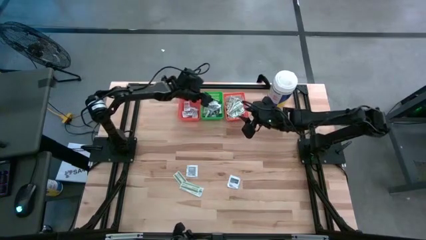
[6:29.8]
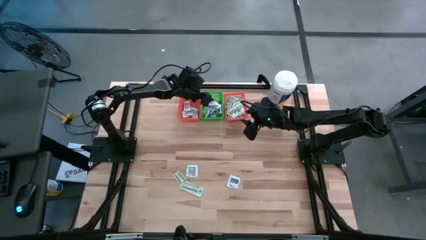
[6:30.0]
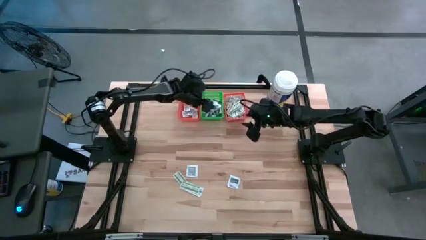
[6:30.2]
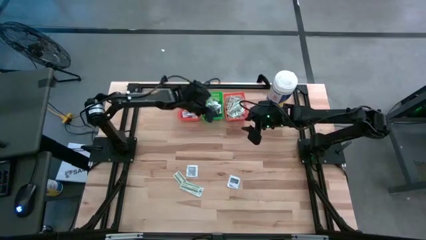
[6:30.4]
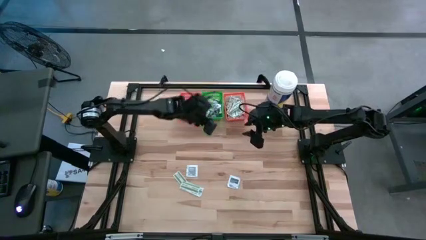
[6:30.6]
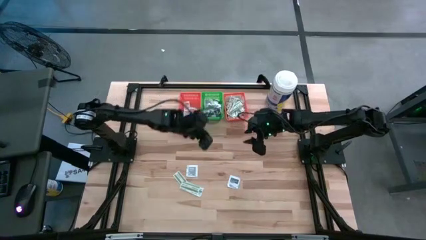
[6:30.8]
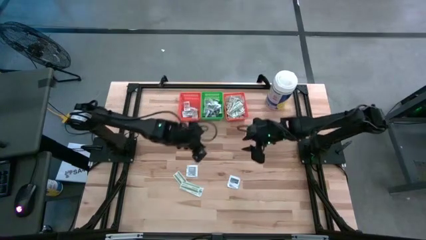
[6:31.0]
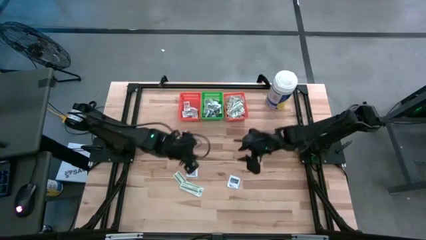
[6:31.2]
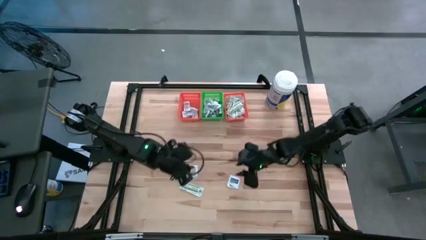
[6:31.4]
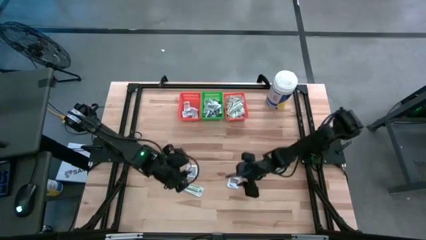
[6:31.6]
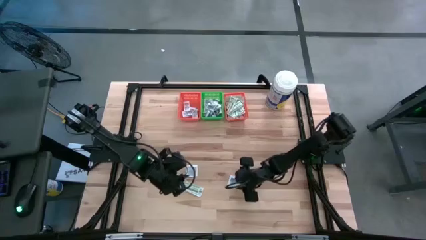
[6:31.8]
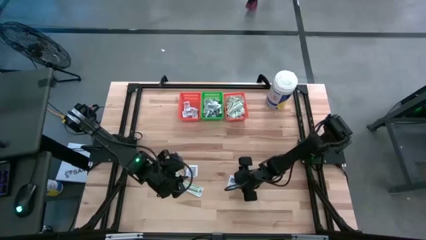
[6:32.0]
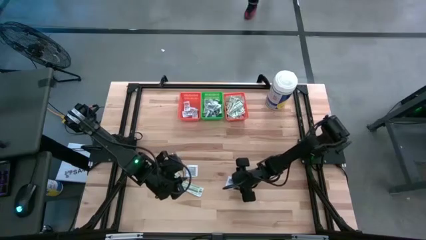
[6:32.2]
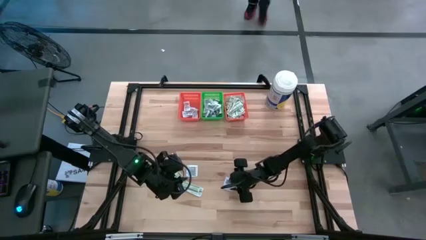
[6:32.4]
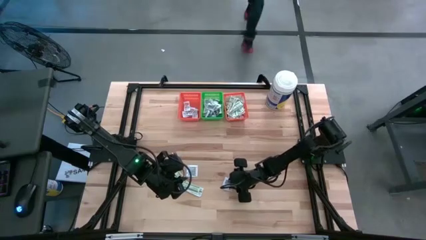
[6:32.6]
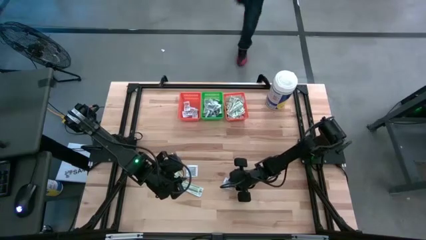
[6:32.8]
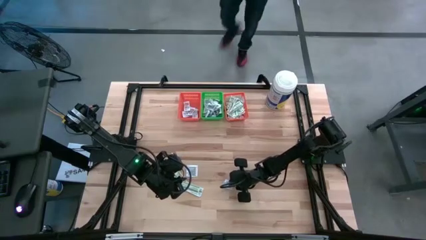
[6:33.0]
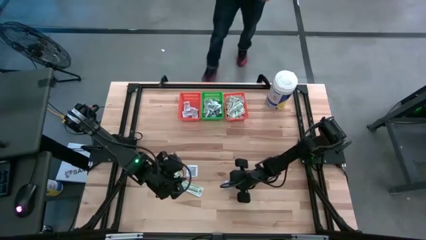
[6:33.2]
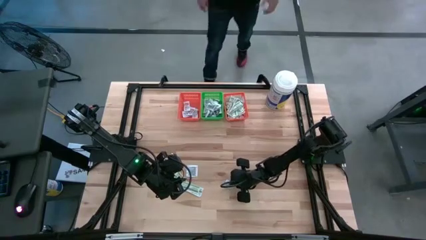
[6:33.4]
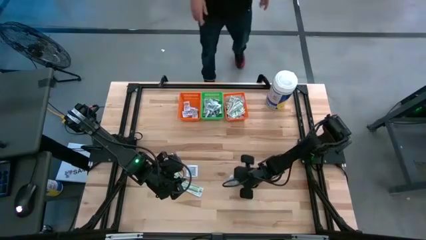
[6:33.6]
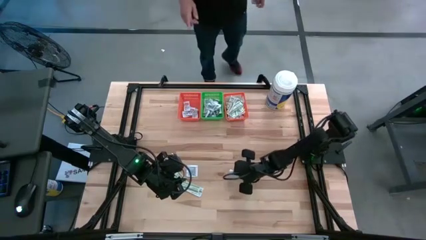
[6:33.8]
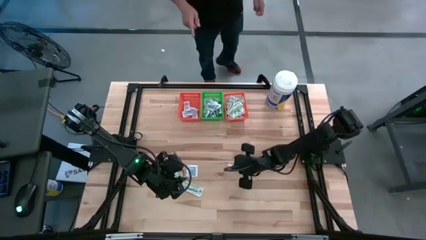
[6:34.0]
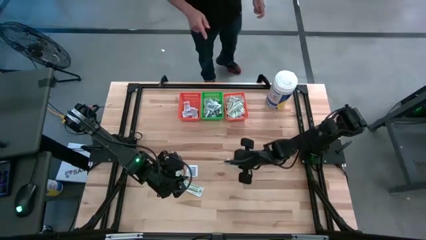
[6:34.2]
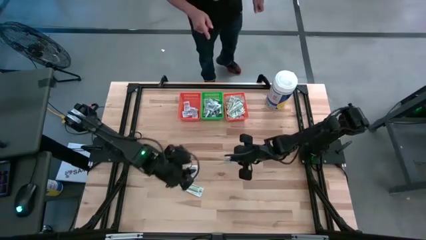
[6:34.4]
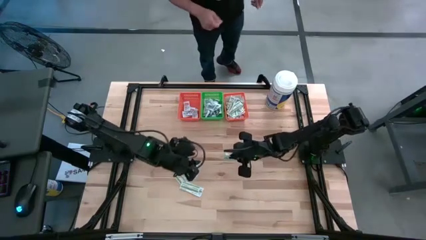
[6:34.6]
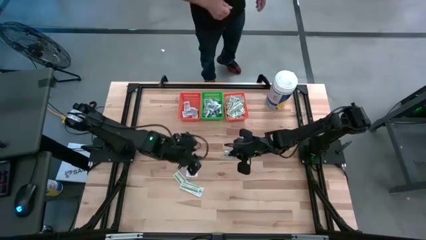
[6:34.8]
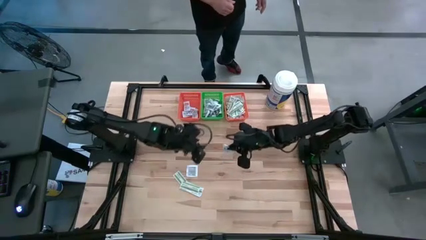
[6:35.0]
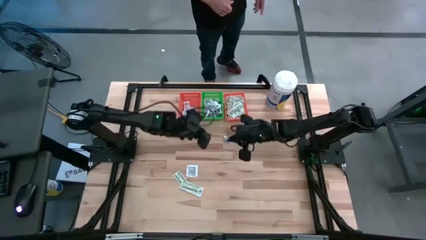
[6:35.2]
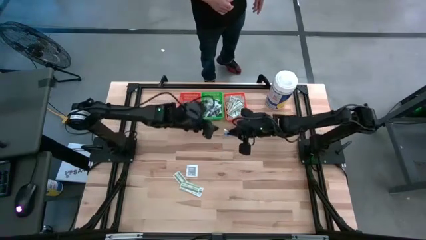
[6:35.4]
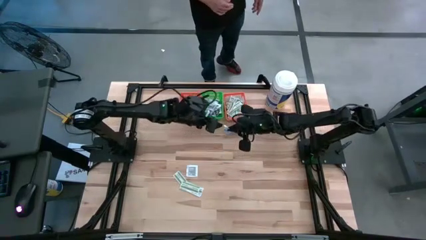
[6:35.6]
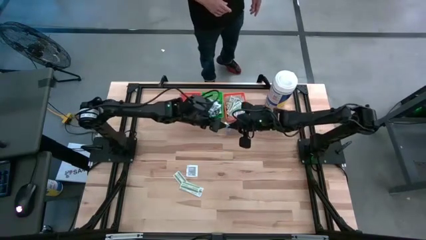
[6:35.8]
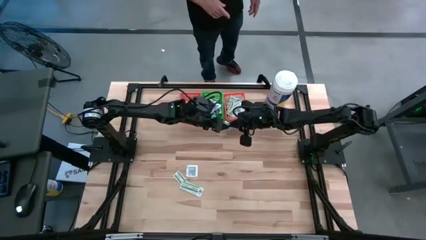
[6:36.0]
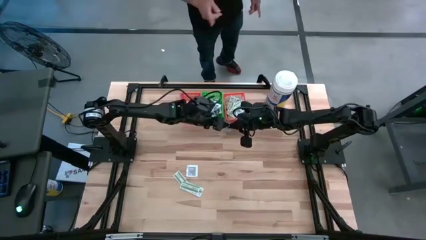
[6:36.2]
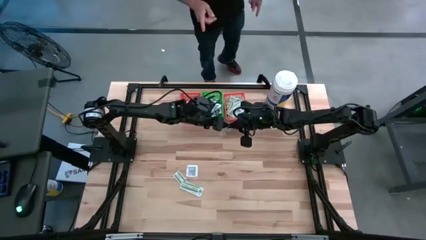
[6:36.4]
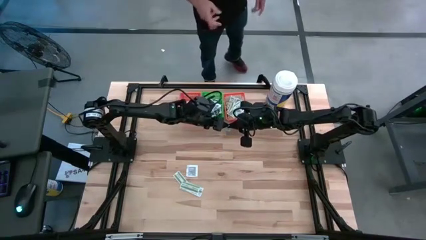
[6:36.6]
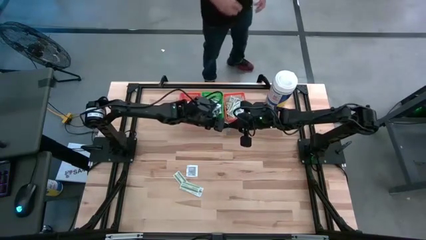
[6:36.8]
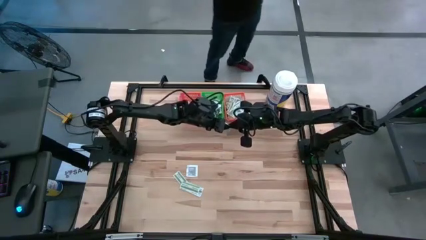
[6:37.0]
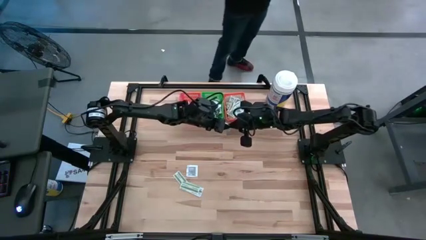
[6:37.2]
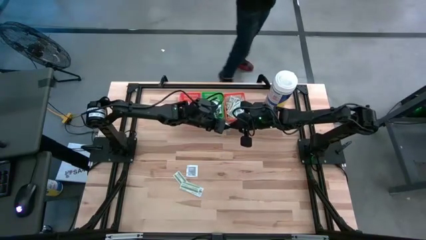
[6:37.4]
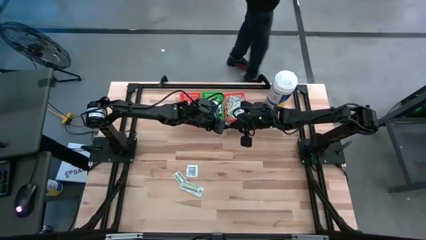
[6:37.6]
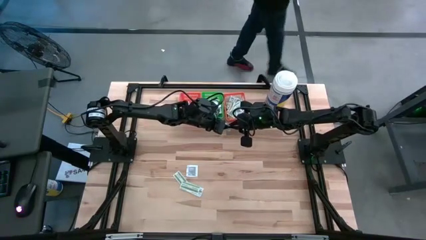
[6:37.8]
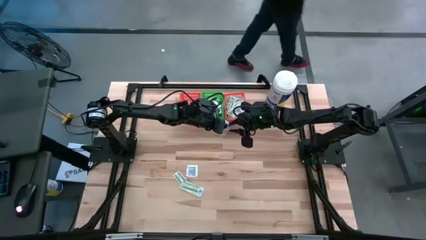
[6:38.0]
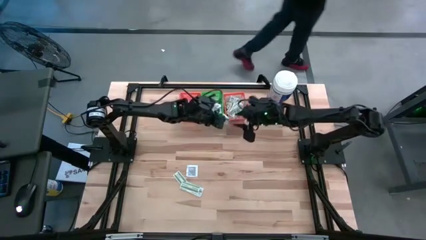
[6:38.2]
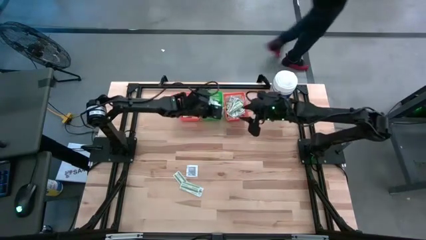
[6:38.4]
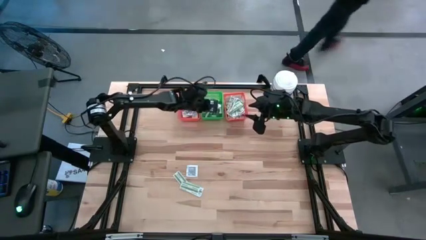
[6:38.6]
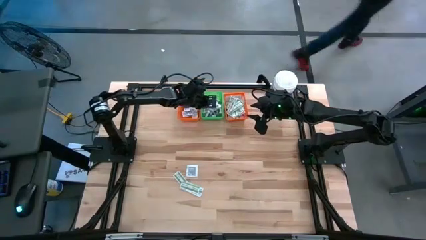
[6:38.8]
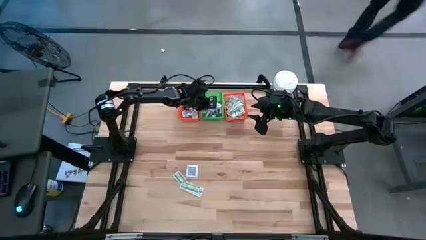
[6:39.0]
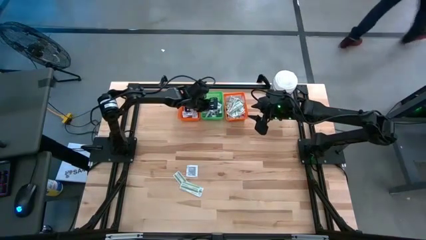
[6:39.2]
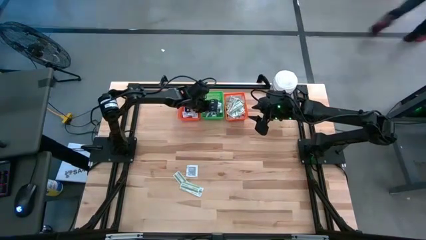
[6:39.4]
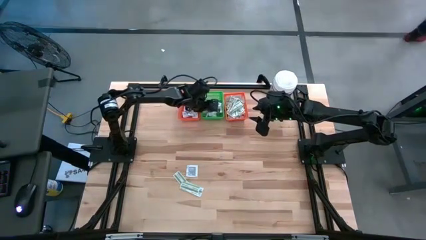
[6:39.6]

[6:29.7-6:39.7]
Task: Pick & Place First Aid Supplies
Put the right towelette pack into the green bin
